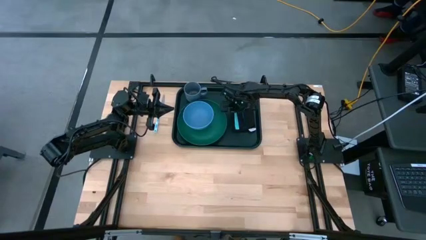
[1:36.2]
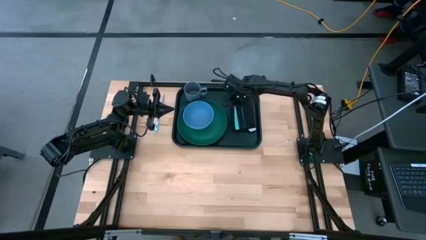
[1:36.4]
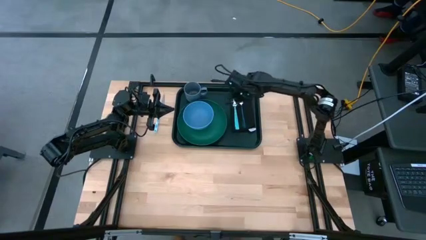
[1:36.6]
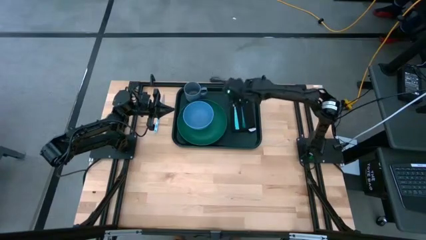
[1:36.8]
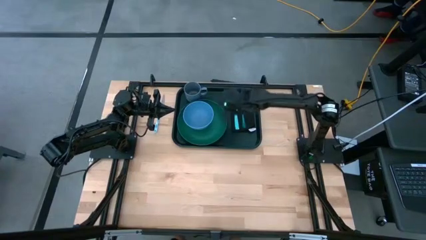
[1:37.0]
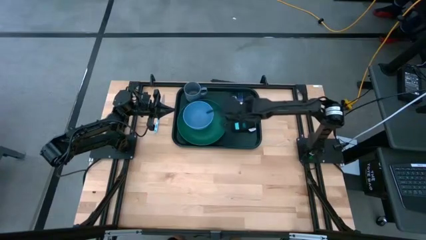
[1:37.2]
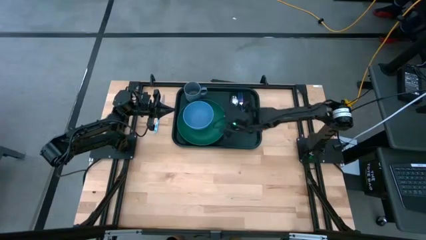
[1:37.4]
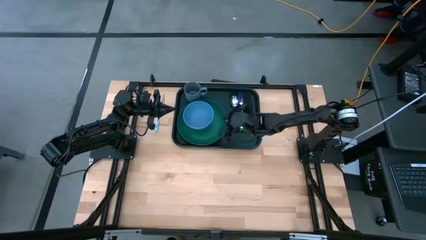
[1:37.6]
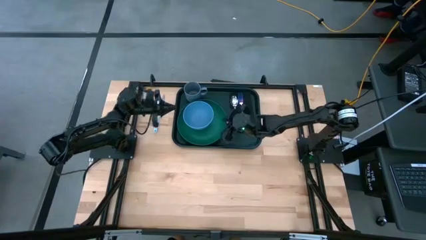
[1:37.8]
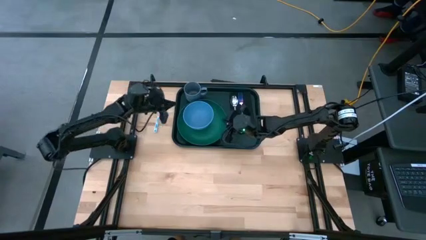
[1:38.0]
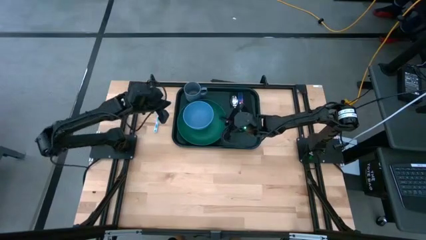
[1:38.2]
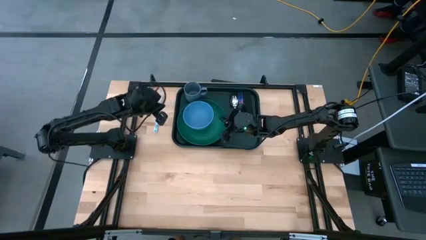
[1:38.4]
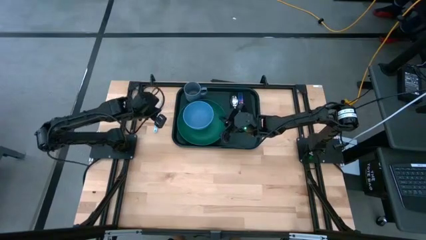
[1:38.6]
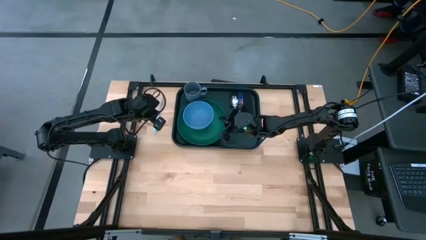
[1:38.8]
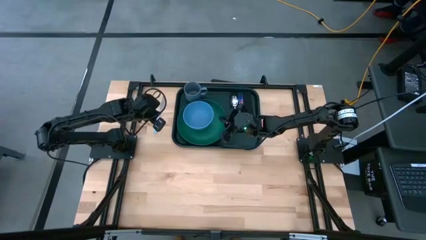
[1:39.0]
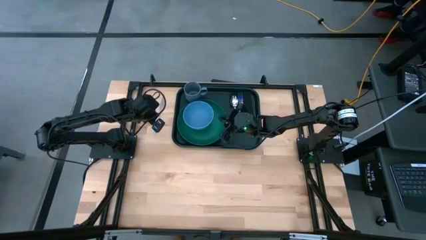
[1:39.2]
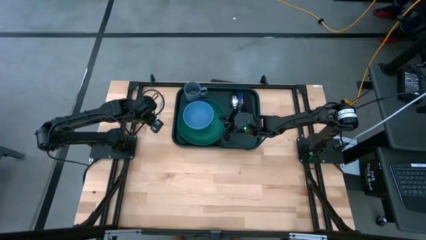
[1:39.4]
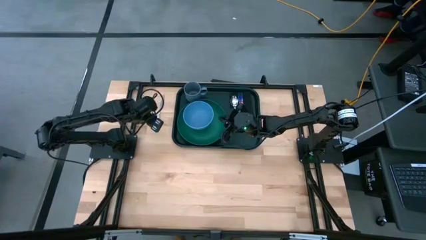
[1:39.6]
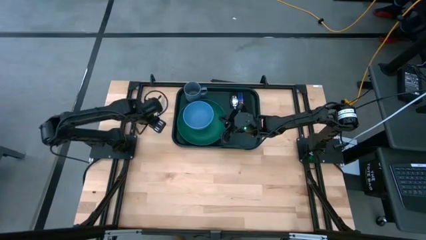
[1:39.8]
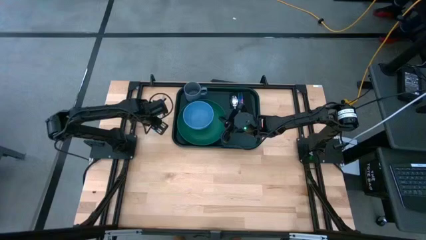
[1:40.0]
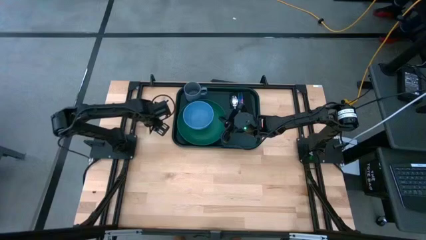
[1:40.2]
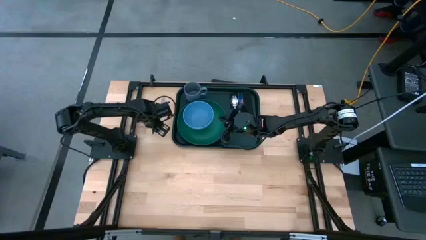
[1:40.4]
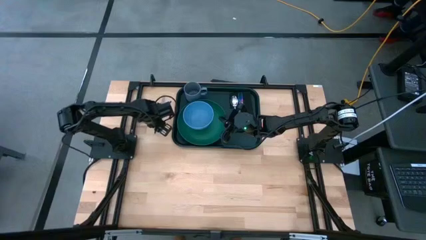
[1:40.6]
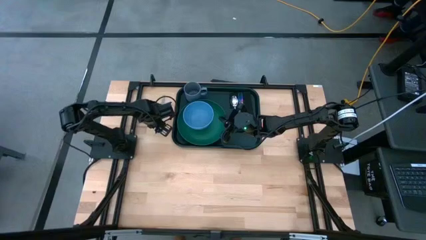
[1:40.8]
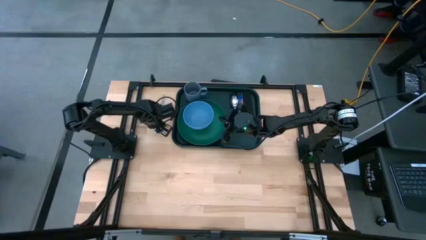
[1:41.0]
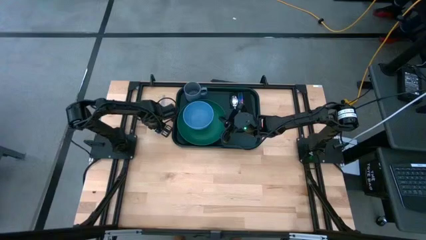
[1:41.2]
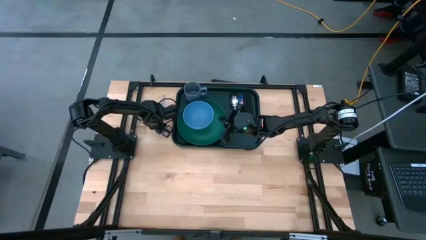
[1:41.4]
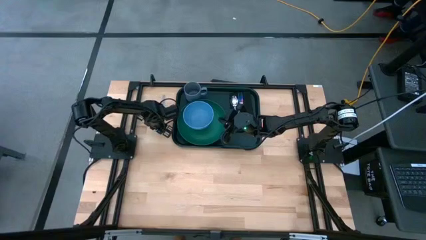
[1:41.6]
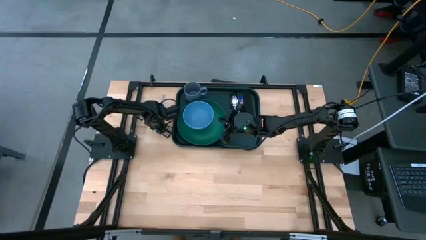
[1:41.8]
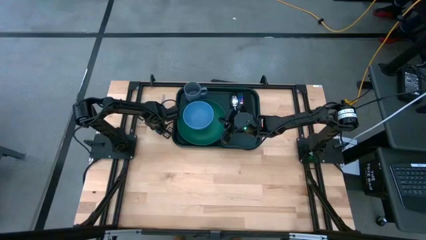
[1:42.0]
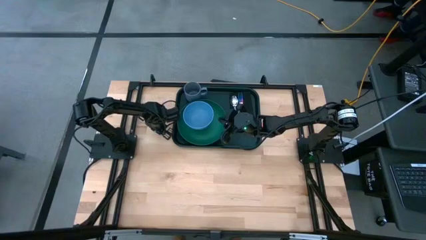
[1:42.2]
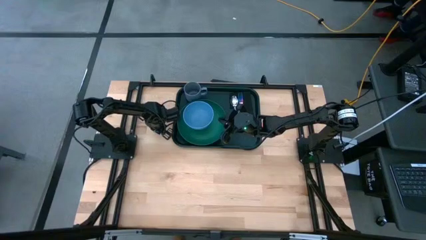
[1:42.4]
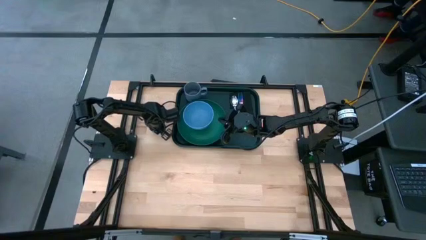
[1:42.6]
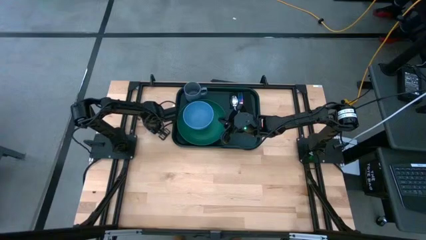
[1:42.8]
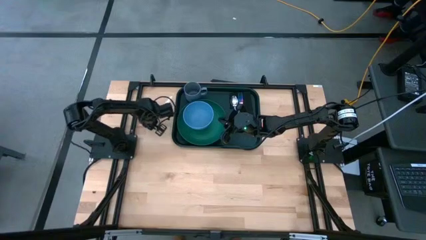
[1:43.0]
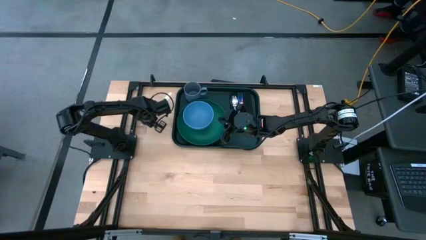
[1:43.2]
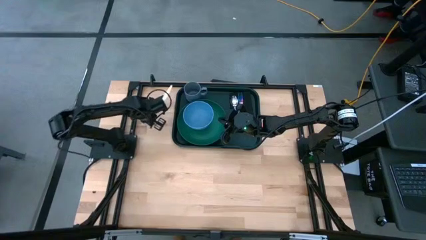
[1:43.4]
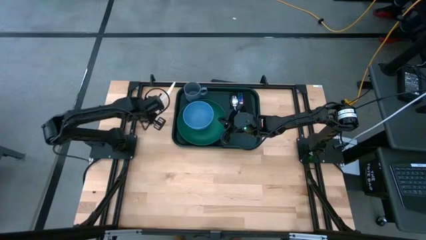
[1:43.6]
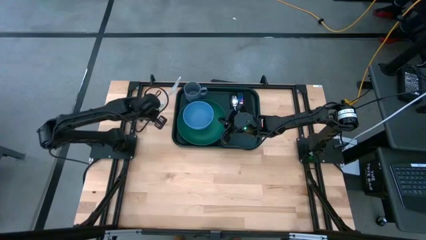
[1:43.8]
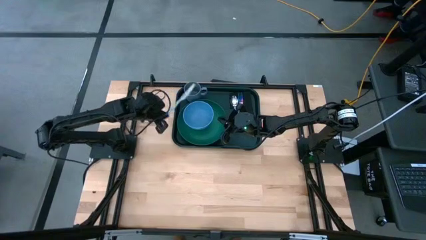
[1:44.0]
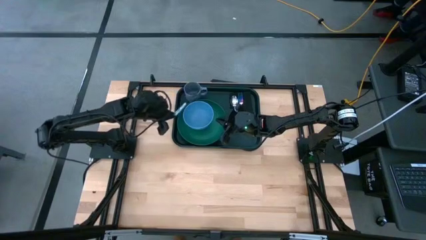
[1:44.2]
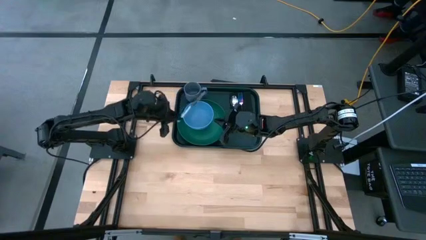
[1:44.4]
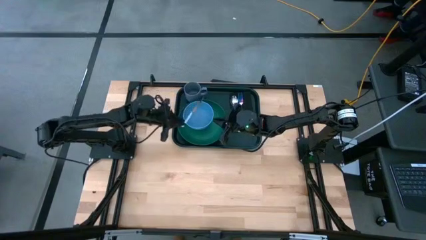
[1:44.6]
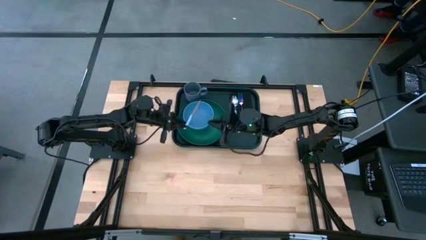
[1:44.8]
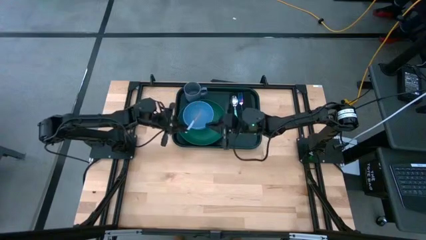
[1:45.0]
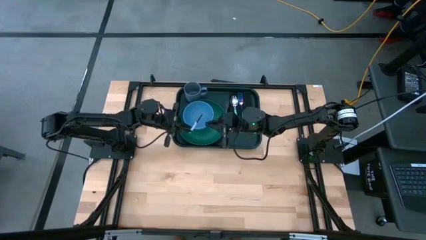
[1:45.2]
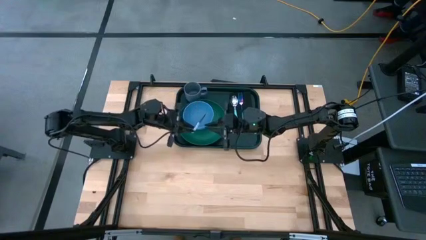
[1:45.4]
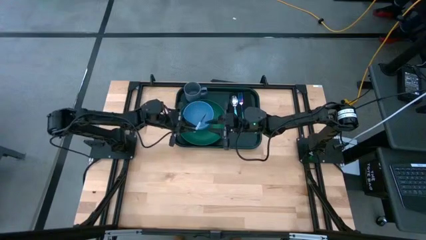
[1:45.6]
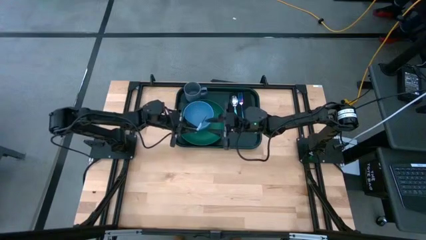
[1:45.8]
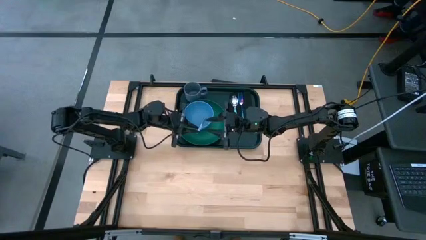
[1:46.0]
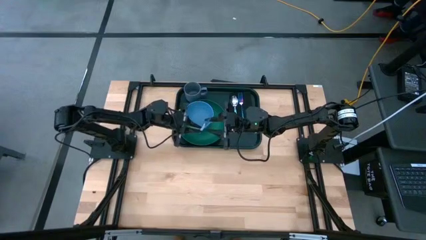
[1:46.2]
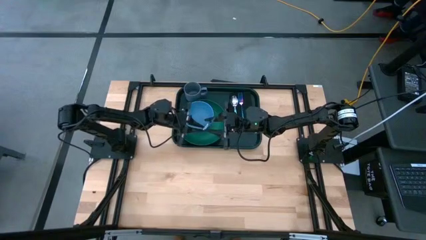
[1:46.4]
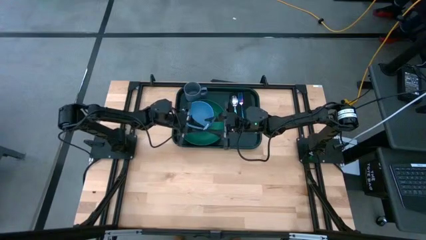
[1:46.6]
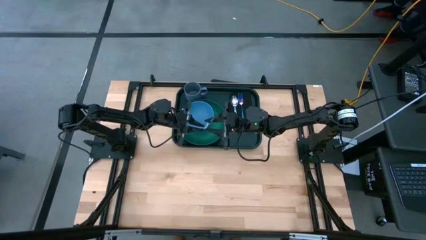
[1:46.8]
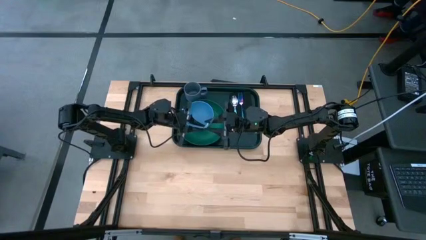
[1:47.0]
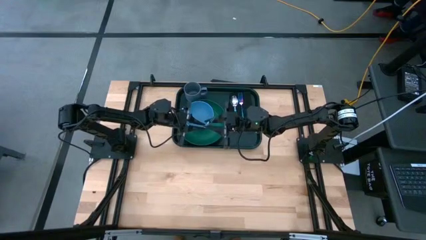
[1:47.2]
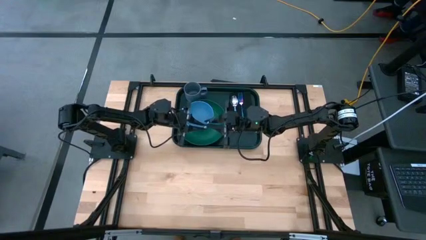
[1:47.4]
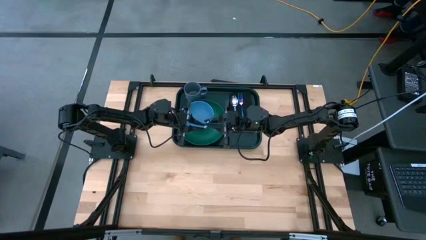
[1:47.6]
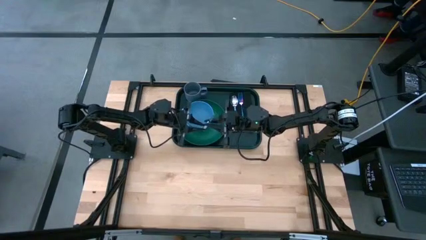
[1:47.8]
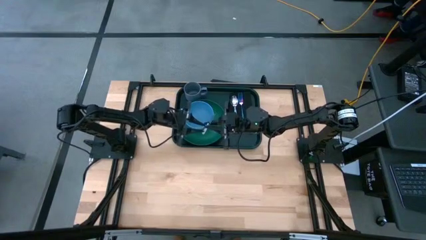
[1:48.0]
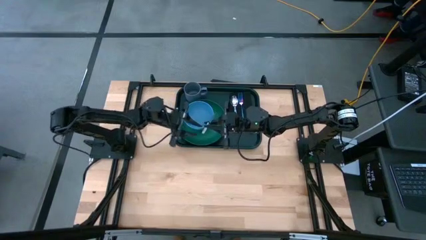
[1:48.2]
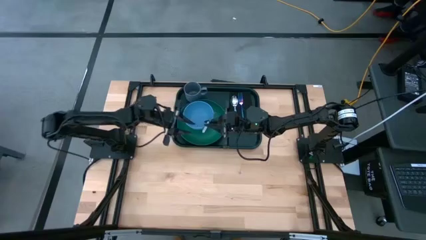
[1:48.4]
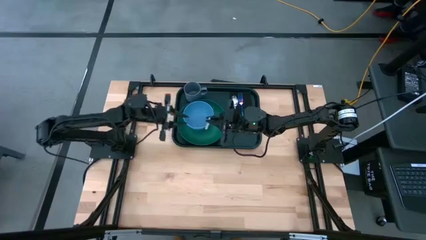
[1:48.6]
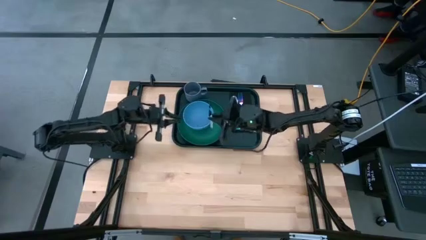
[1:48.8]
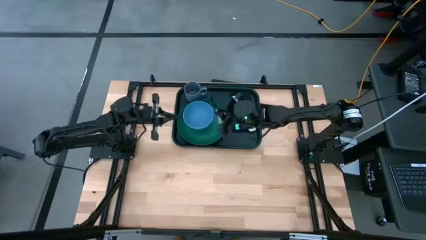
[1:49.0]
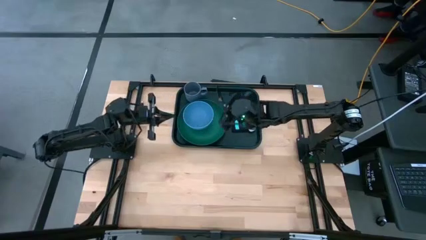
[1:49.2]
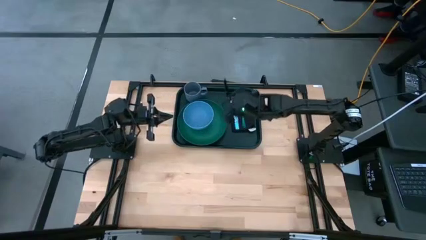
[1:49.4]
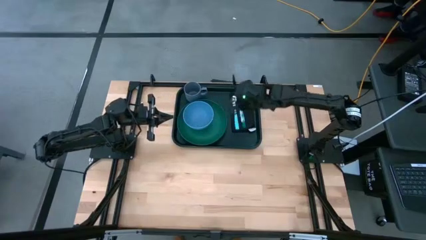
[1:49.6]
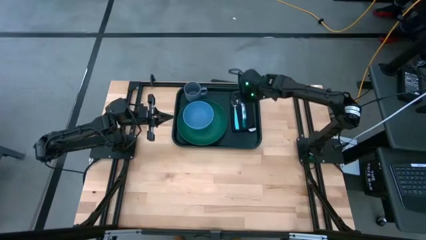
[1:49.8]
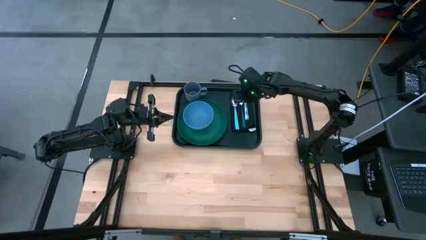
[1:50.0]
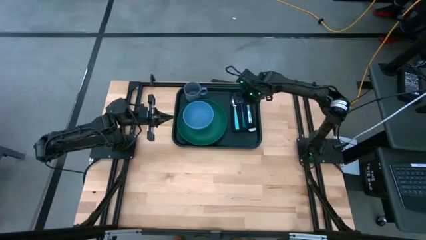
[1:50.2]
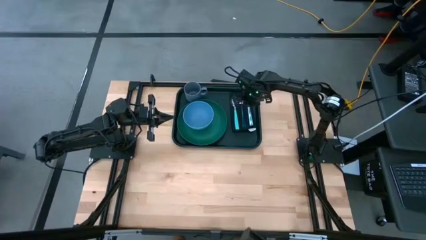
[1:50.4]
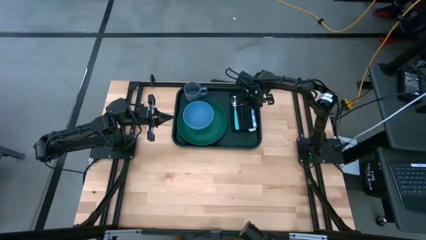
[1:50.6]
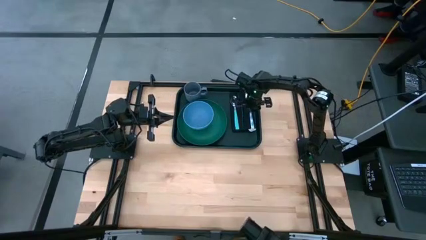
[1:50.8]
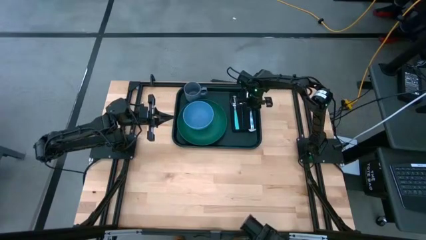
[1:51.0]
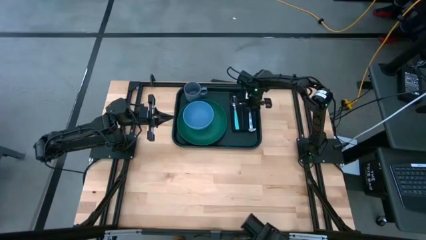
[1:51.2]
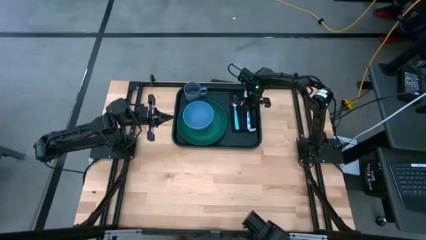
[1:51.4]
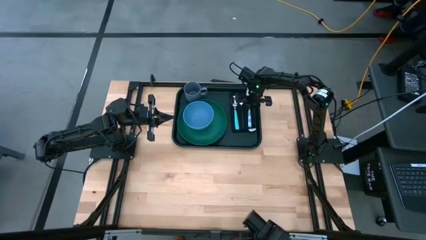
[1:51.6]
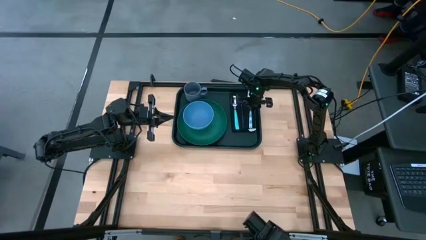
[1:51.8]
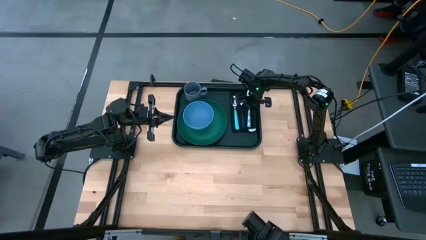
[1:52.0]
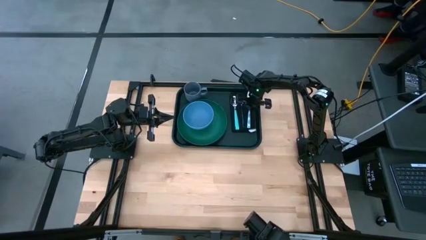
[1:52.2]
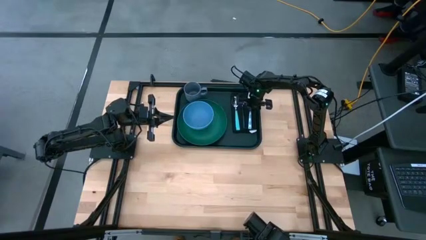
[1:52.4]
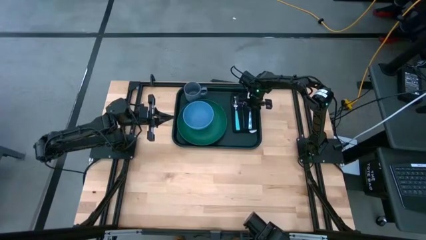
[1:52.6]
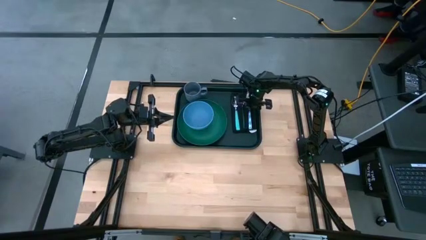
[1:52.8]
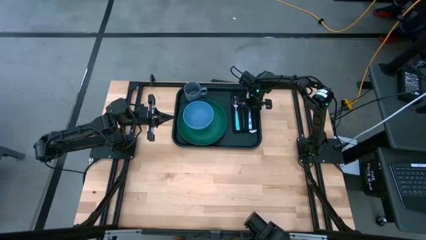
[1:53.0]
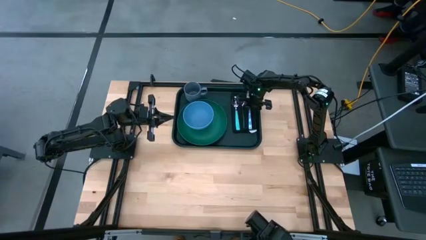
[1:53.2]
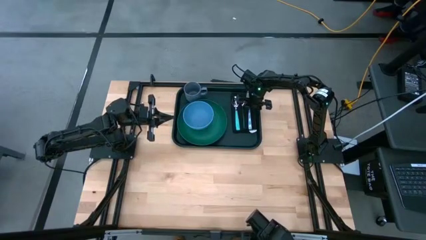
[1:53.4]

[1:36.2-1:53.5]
Task: Set up tray
Put the blue patterned table knife on top of the table napkin on the black tray
